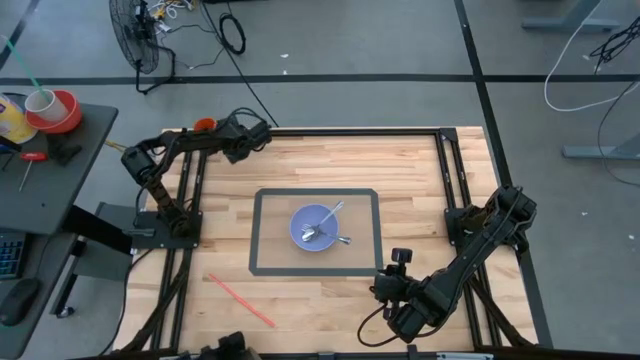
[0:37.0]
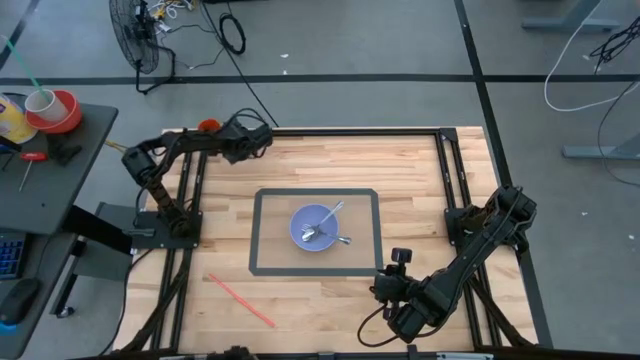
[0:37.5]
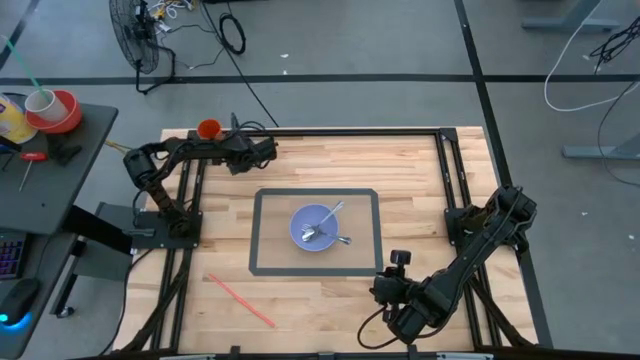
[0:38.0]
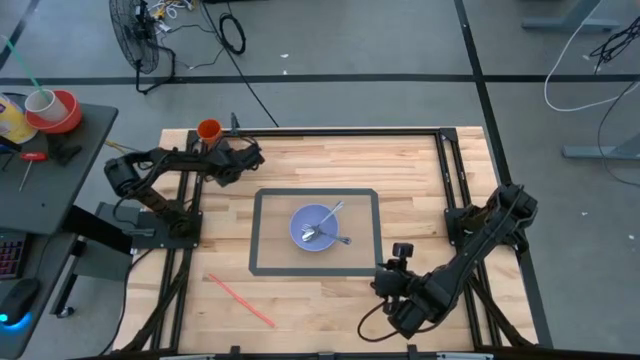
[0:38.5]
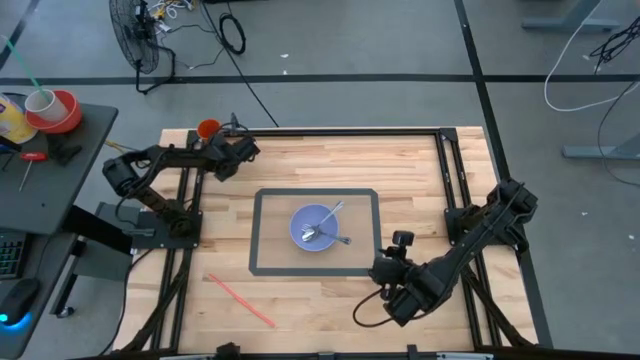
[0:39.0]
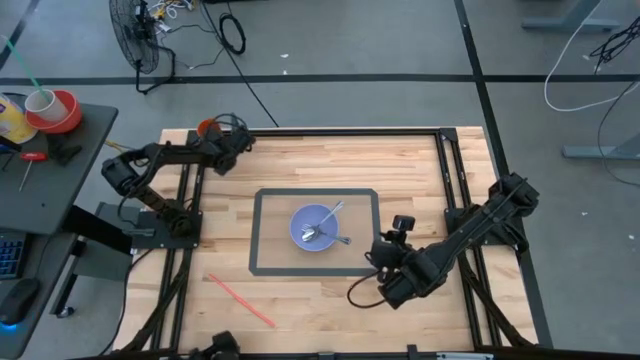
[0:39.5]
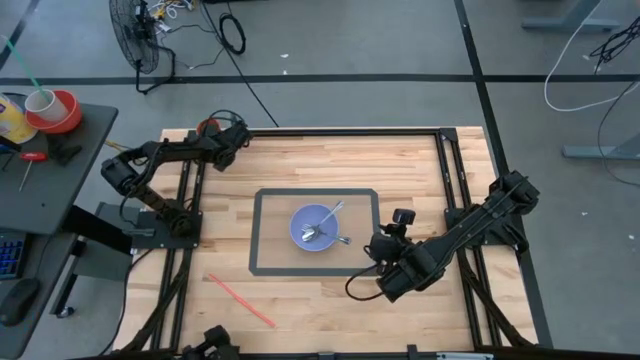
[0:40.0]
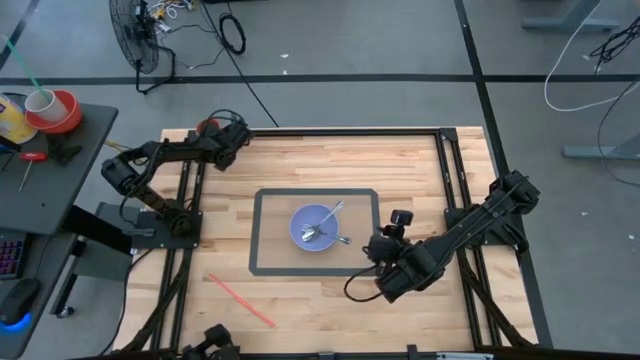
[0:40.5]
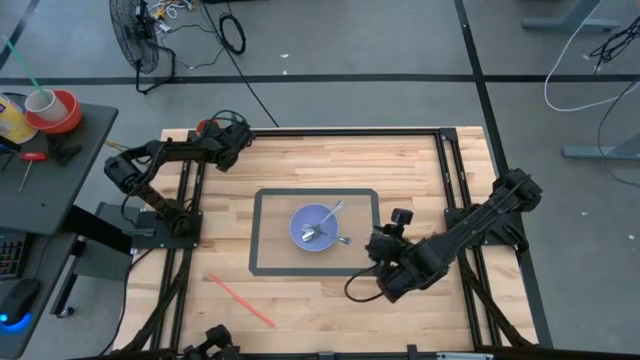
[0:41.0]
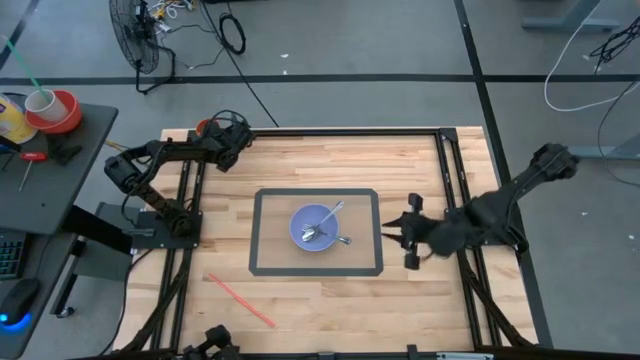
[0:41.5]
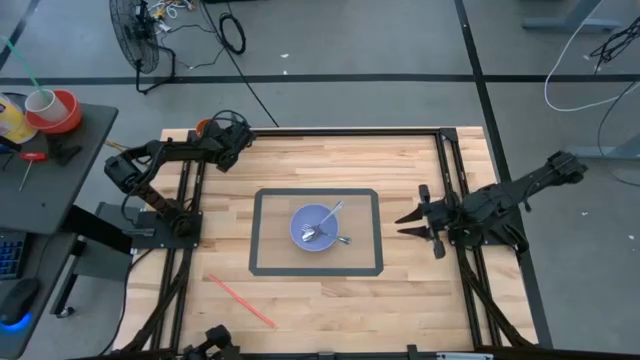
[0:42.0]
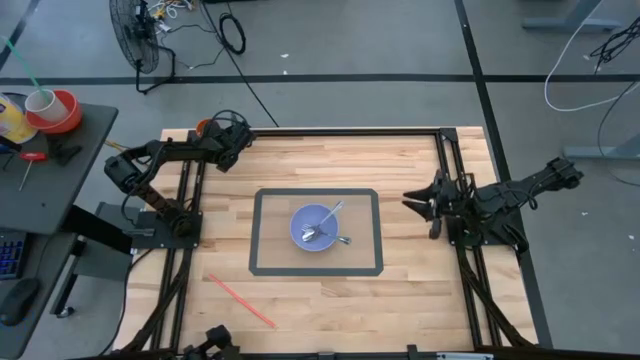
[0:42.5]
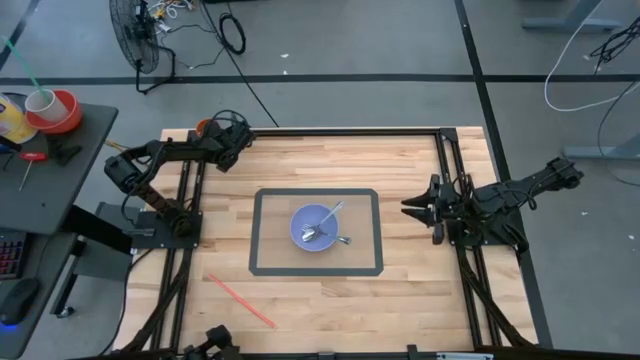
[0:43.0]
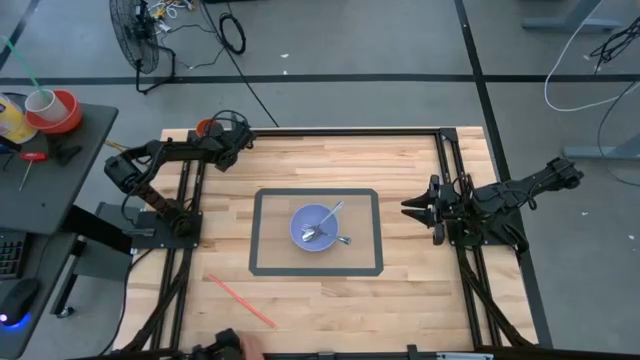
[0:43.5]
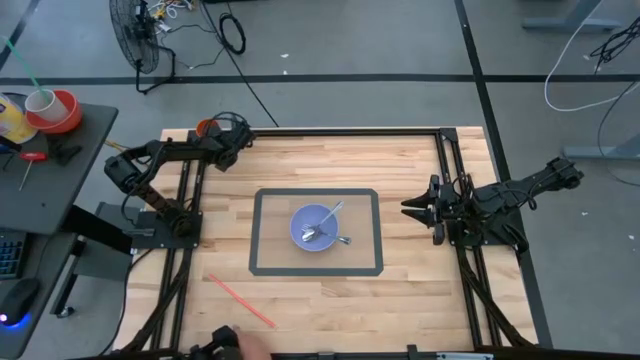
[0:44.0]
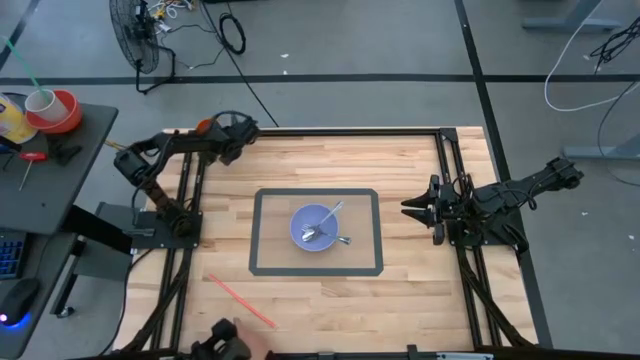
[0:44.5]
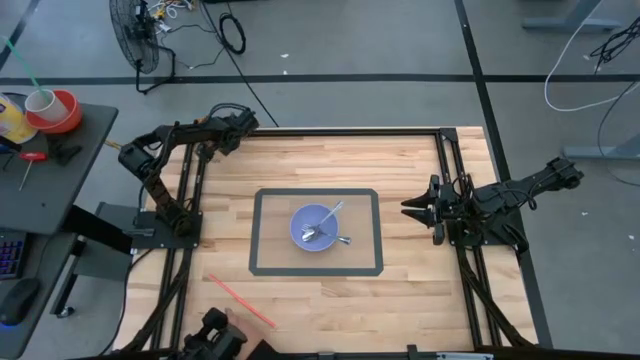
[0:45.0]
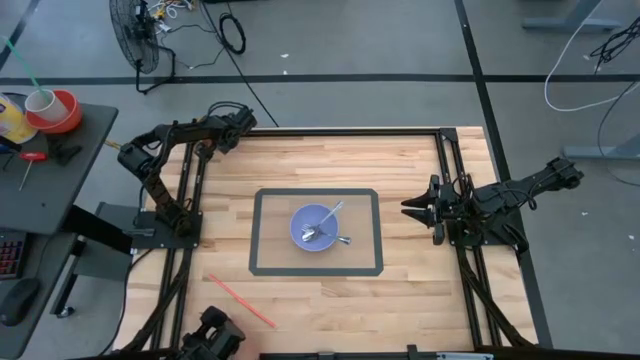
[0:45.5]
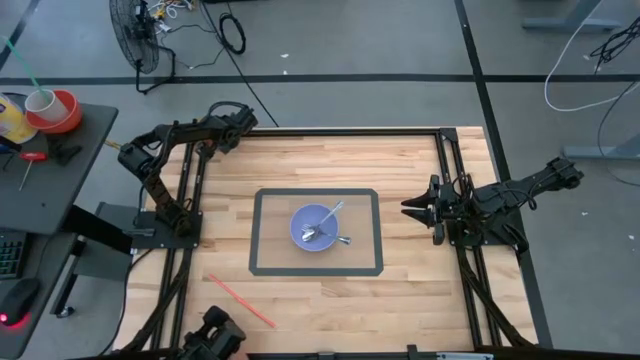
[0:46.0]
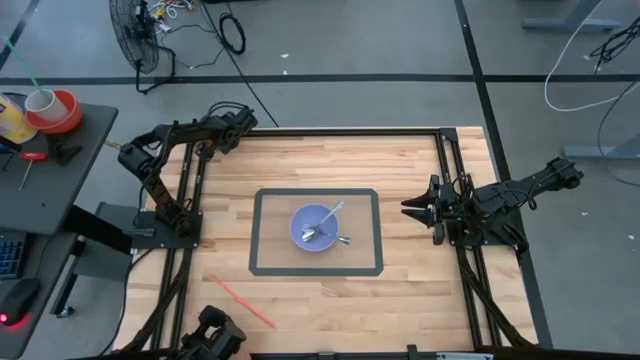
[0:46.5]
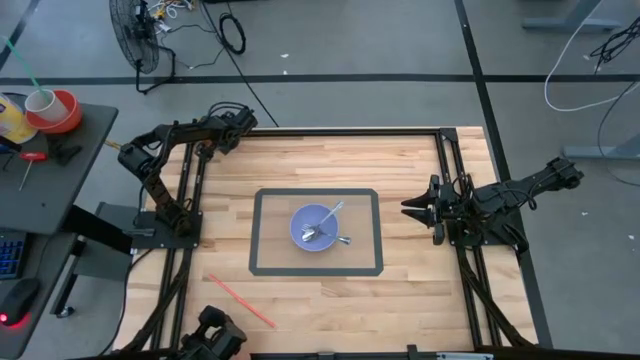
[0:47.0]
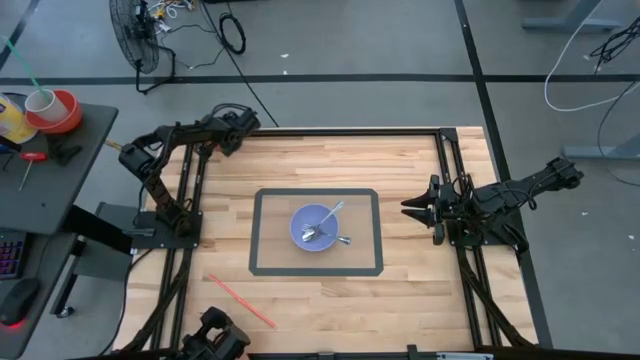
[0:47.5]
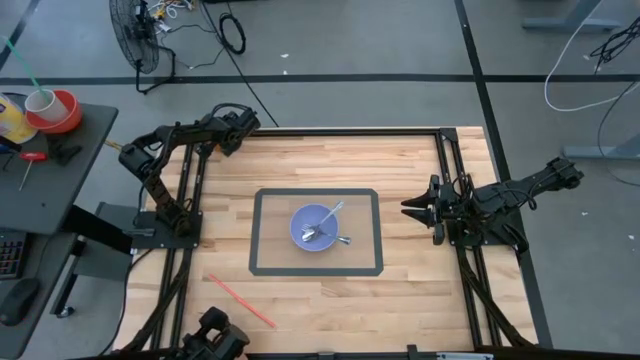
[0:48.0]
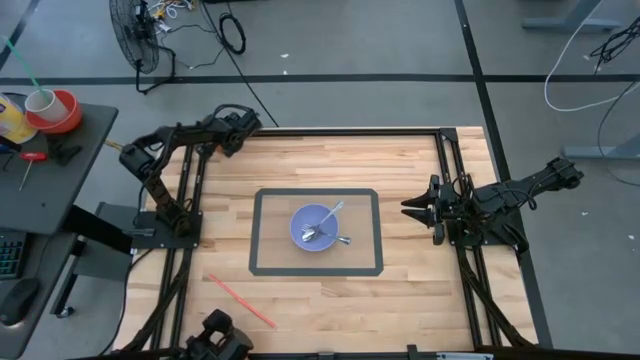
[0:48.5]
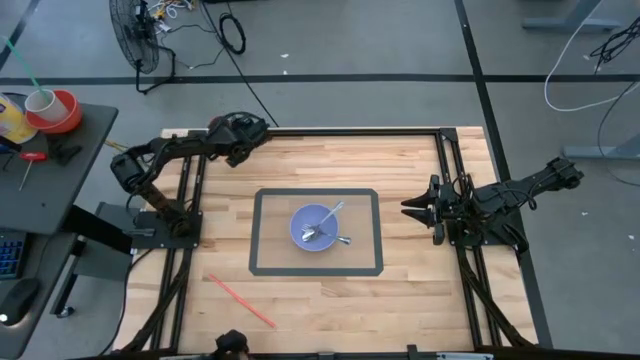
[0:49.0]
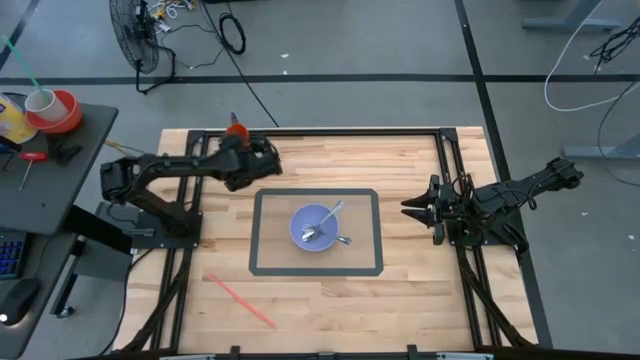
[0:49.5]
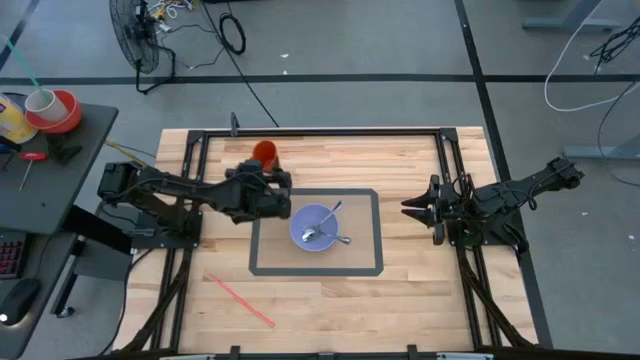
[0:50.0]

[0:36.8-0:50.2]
Task: Pick & Place Utensil
Put the orange cup on the mat to the top right of the purple bowl

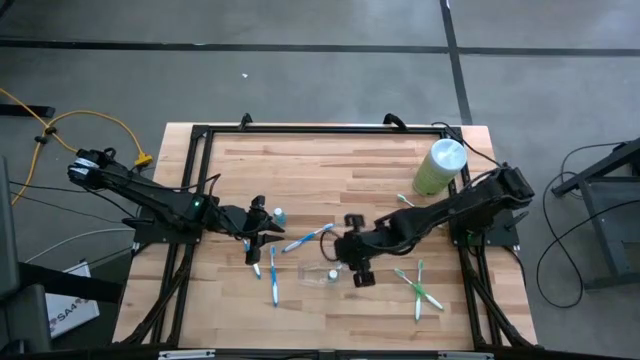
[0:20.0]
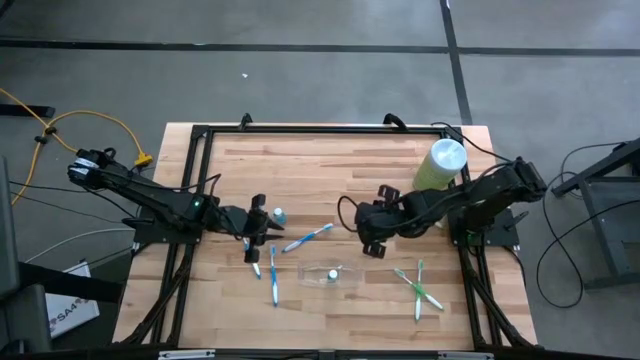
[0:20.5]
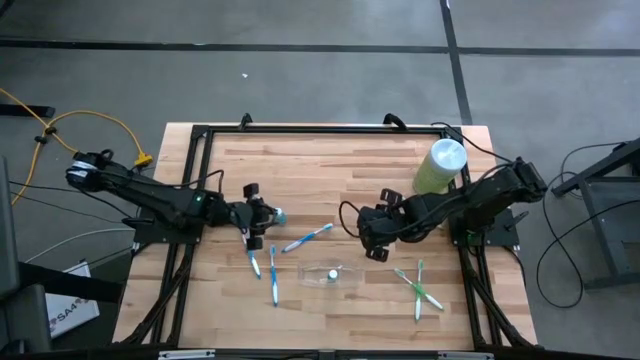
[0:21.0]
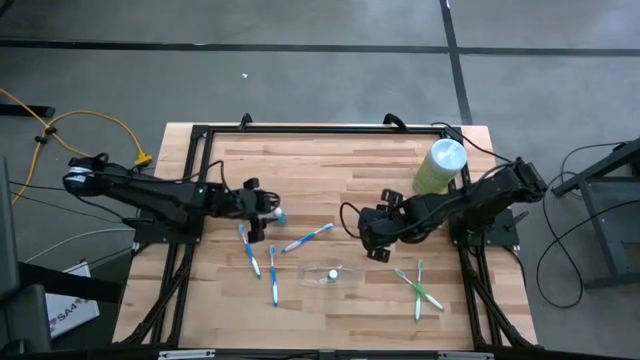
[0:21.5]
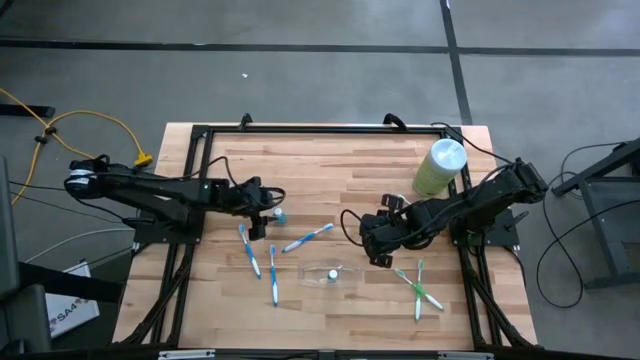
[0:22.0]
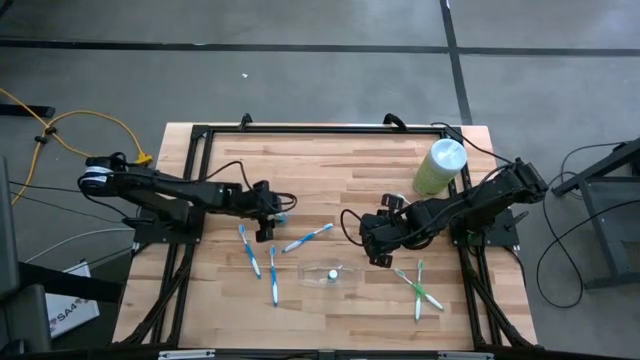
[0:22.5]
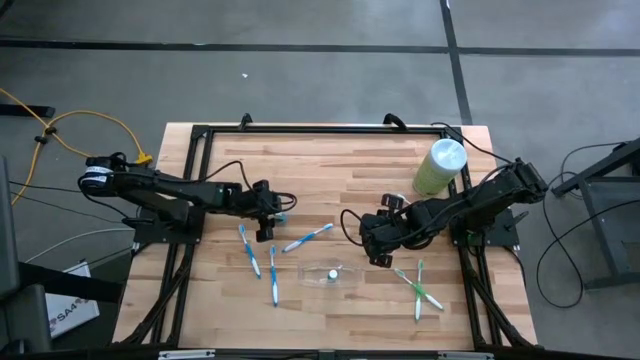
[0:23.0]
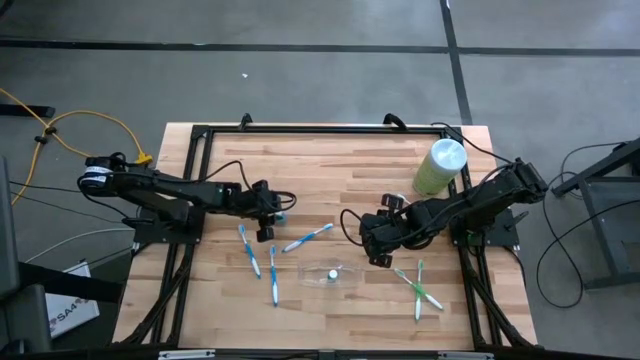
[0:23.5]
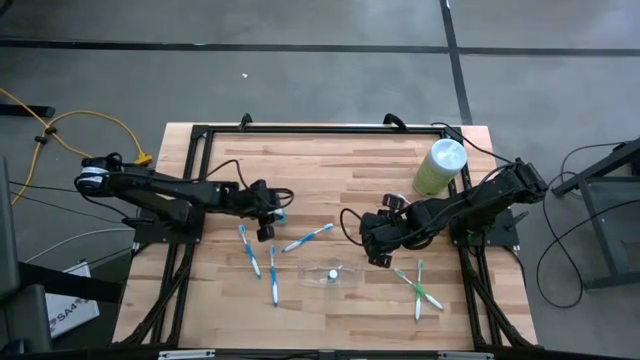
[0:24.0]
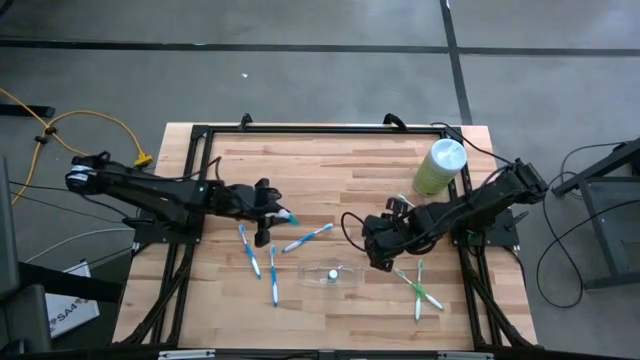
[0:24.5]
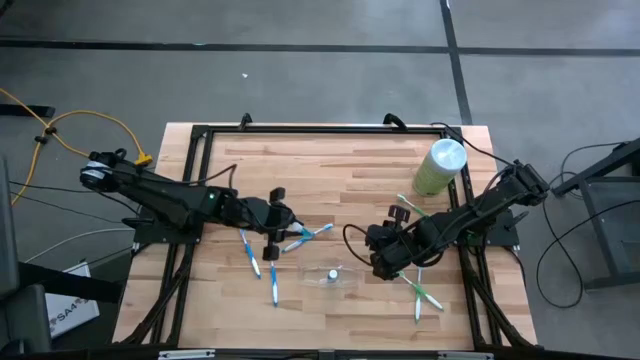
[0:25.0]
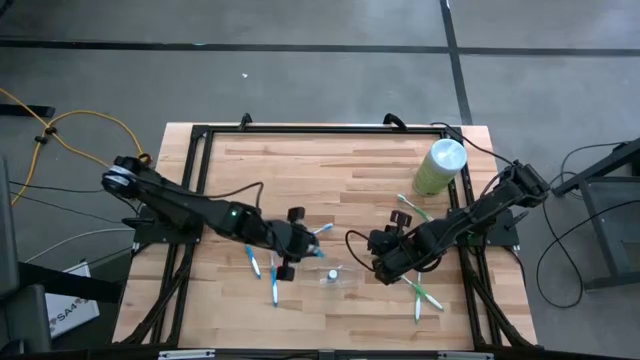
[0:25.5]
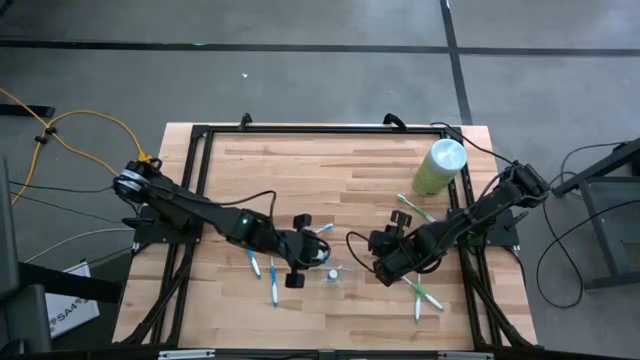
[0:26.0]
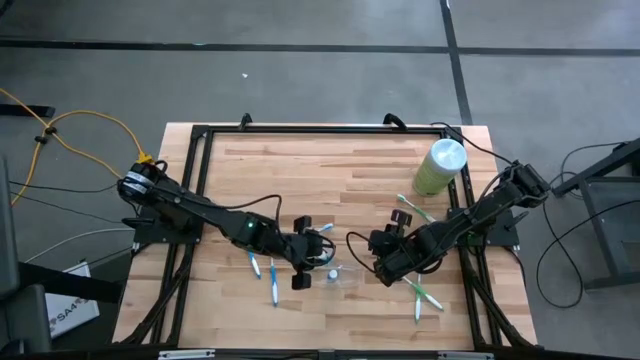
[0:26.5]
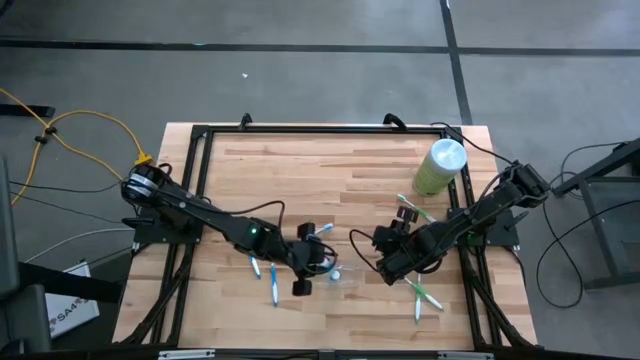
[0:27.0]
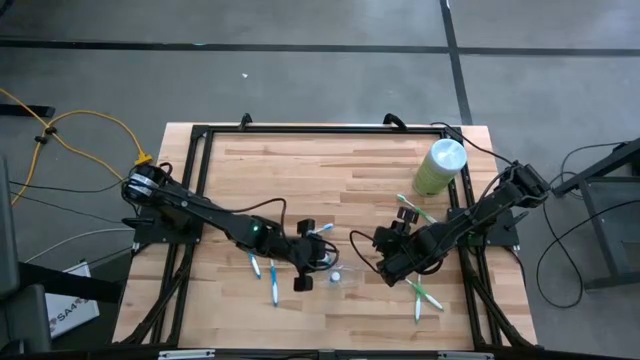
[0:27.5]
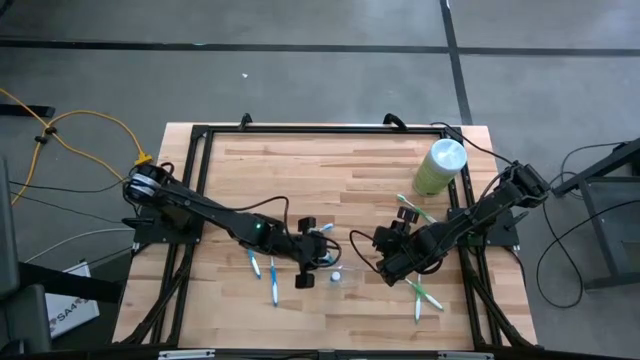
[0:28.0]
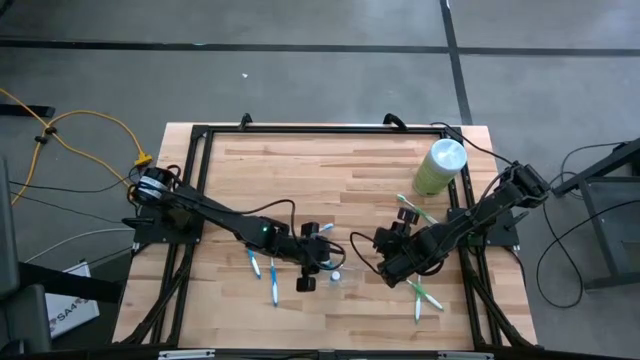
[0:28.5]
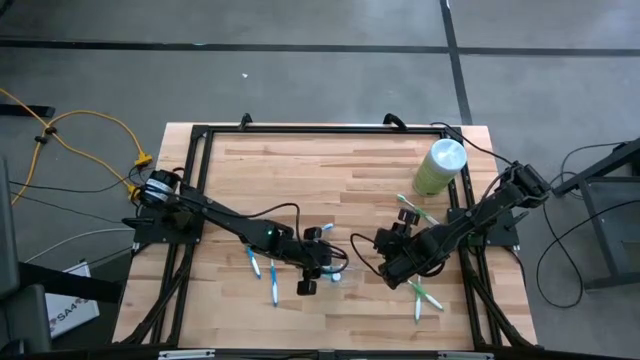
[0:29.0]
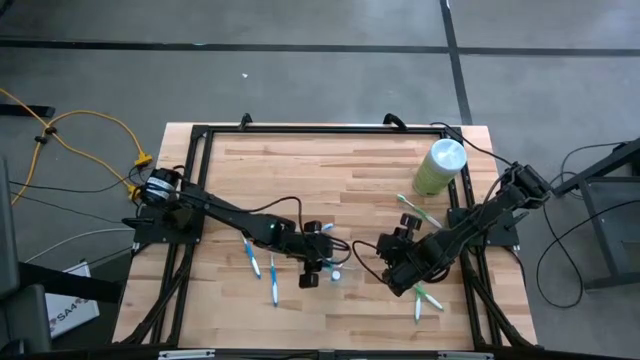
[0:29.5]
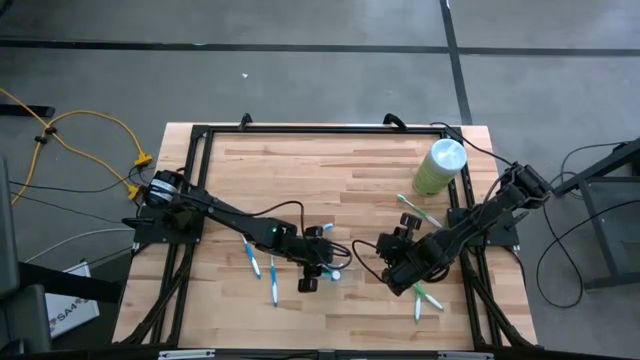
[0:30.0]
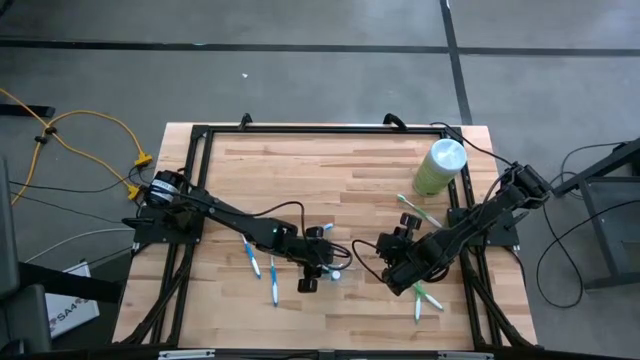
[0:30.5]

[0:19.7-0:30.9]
Task: Pick & Place toothbrushing station
Put the blue mouthwash bottle into the transparent organizer
